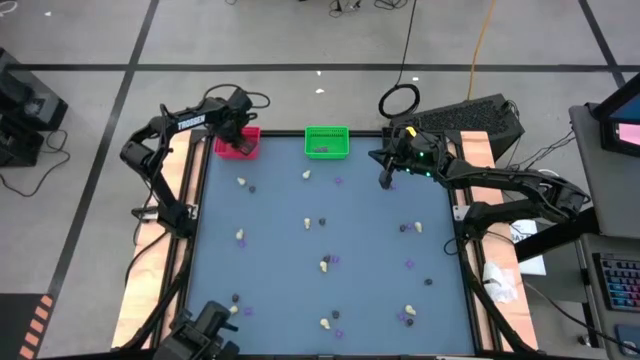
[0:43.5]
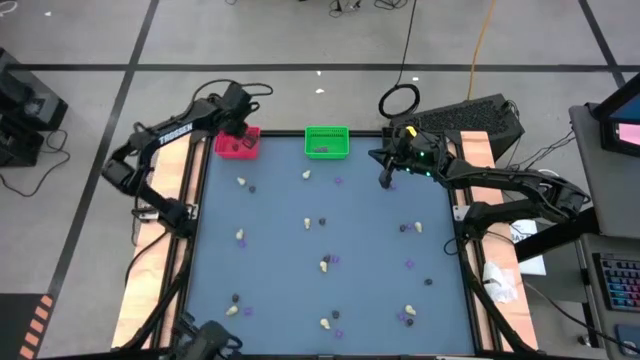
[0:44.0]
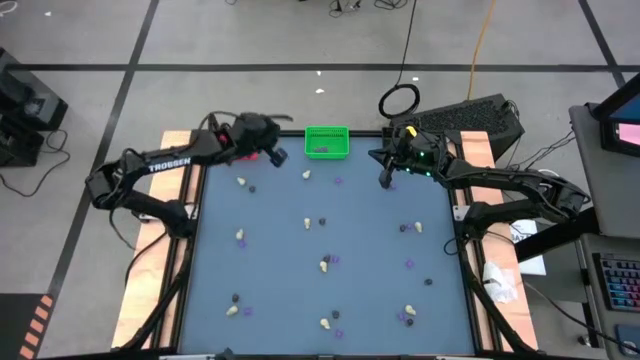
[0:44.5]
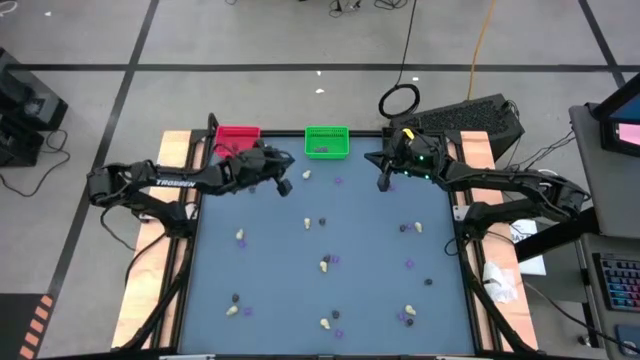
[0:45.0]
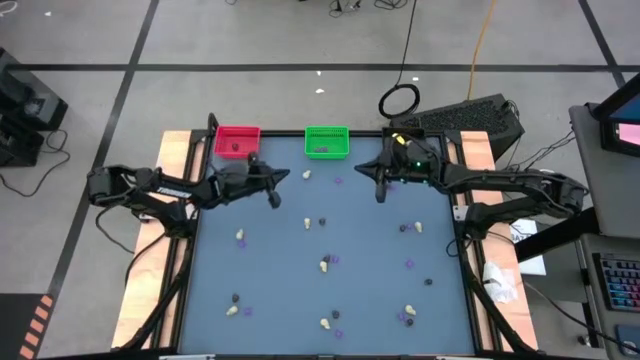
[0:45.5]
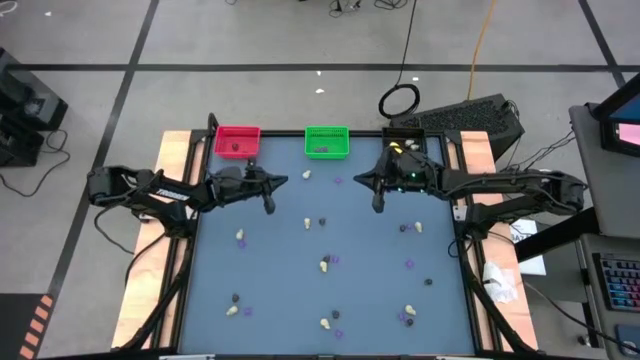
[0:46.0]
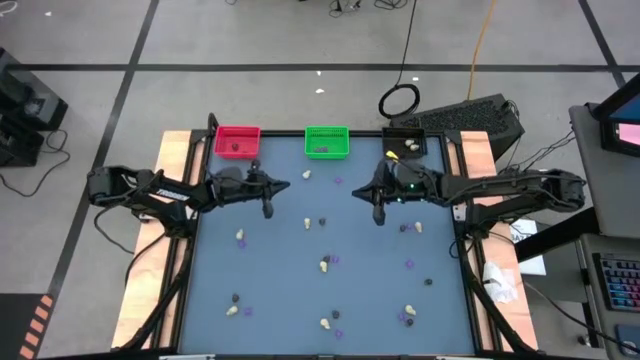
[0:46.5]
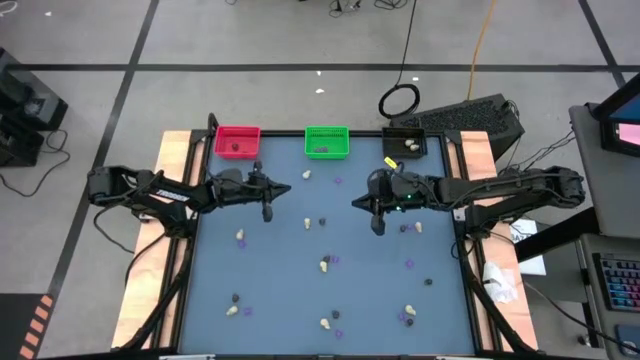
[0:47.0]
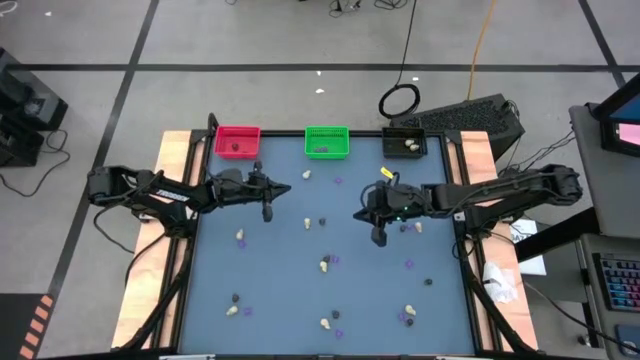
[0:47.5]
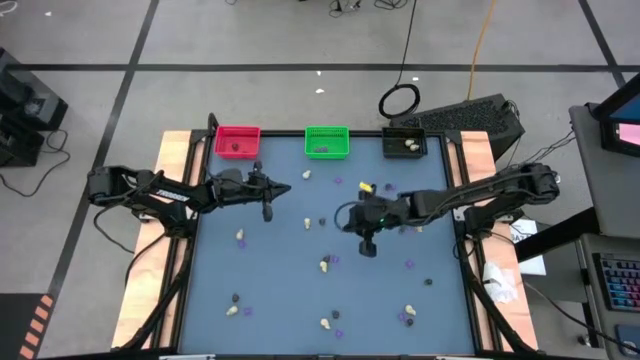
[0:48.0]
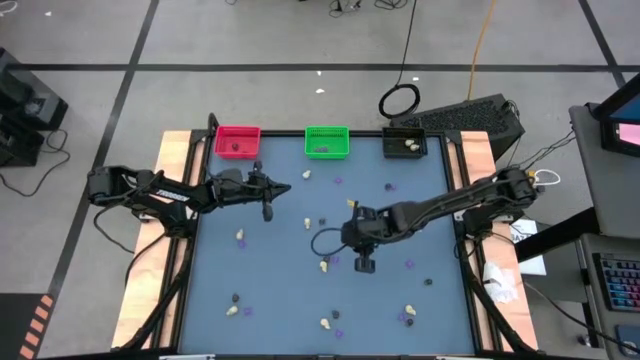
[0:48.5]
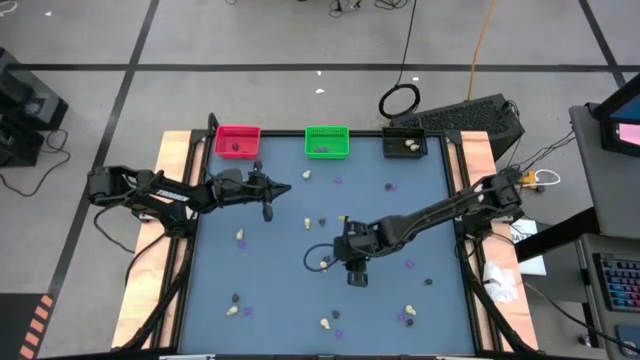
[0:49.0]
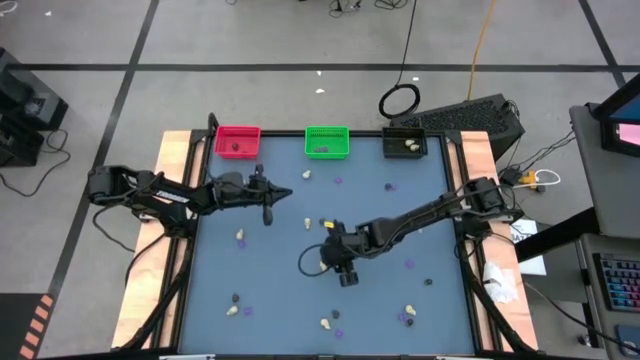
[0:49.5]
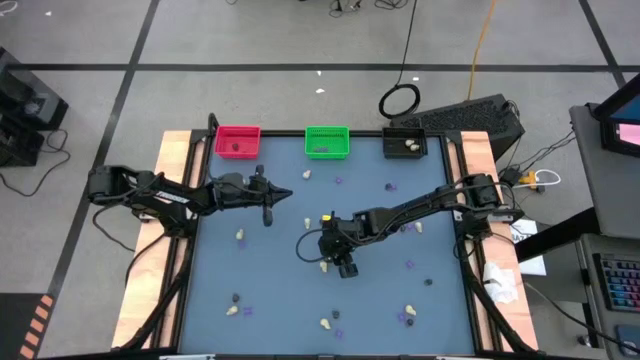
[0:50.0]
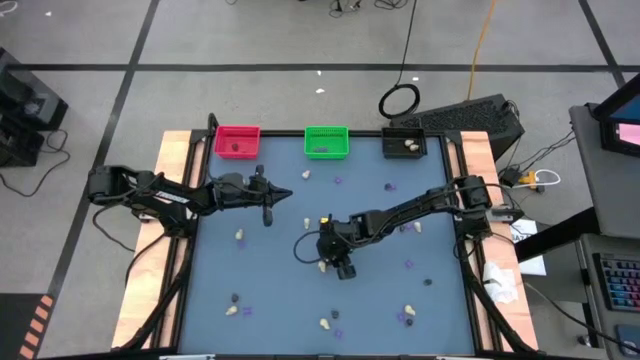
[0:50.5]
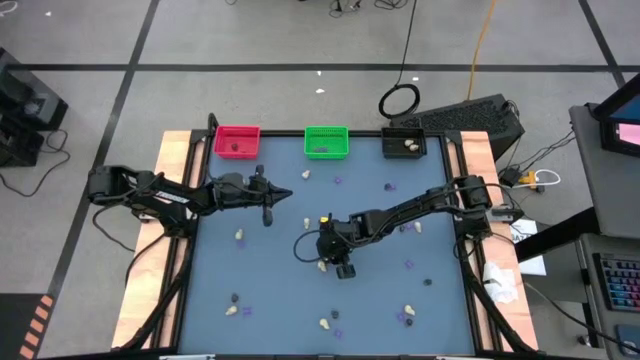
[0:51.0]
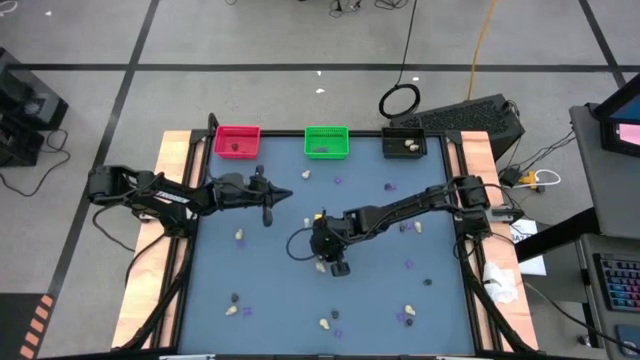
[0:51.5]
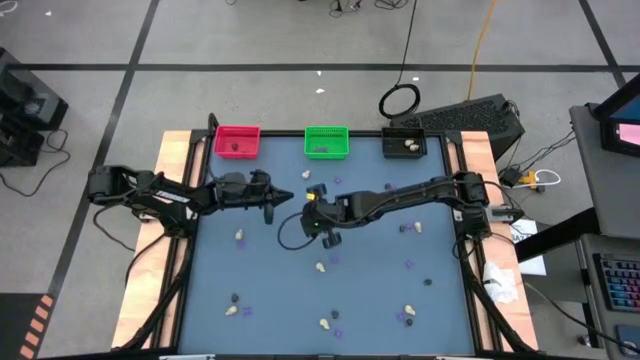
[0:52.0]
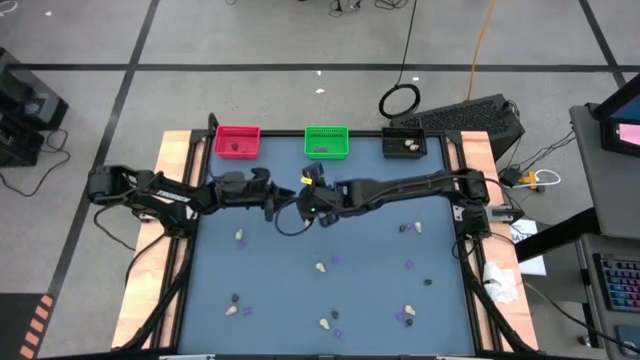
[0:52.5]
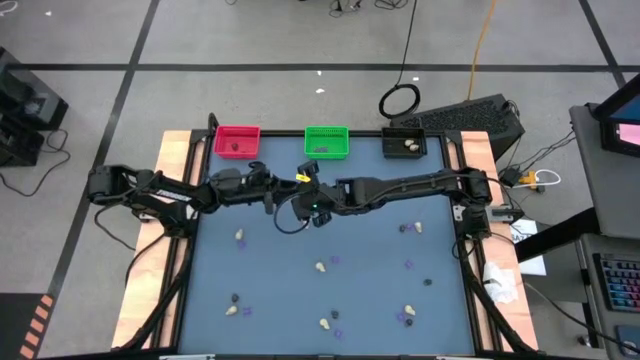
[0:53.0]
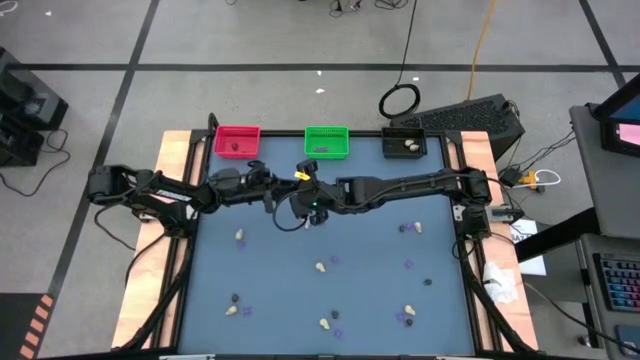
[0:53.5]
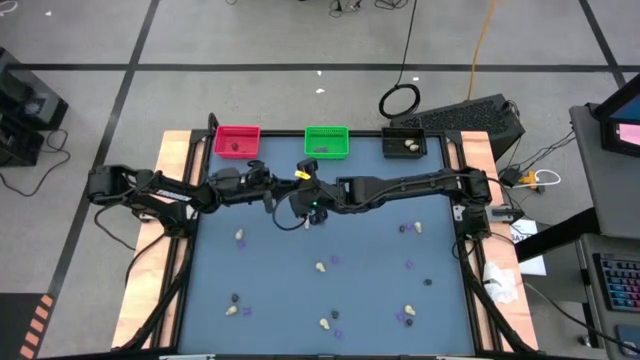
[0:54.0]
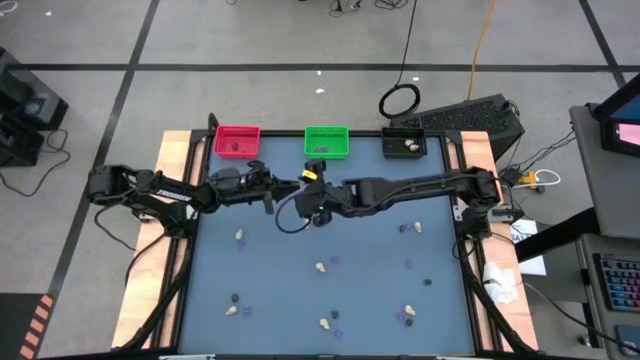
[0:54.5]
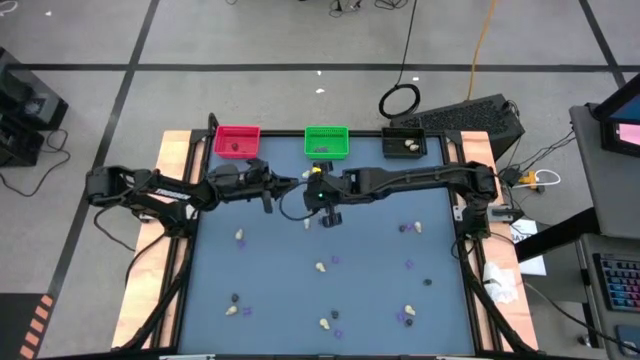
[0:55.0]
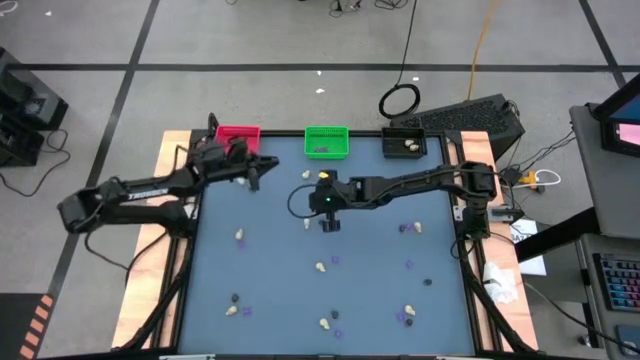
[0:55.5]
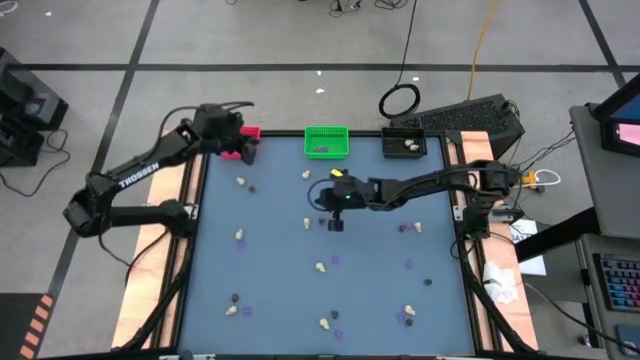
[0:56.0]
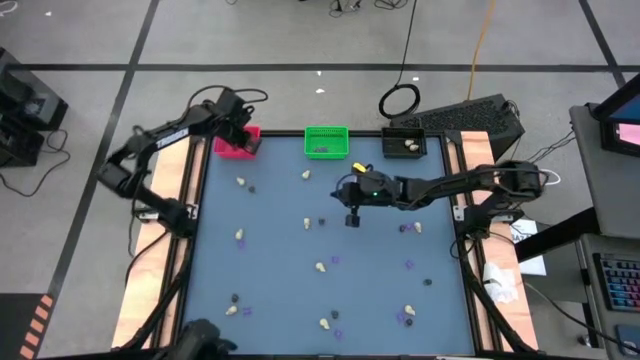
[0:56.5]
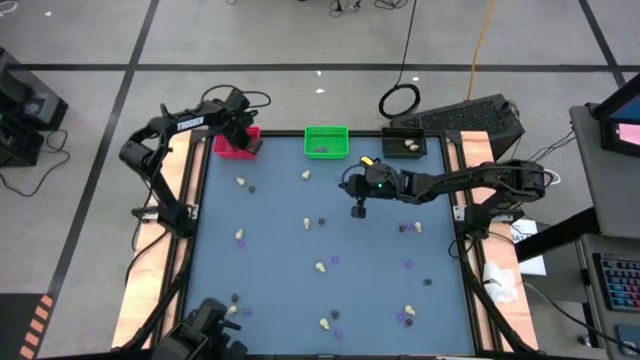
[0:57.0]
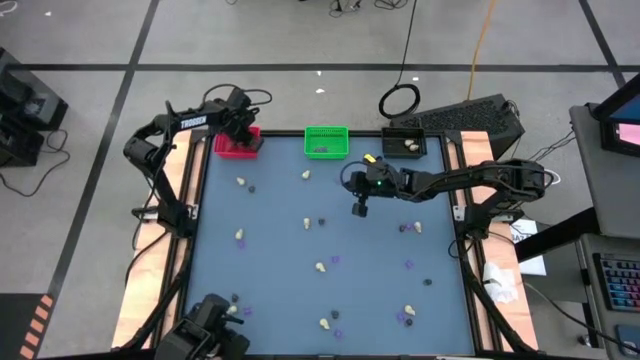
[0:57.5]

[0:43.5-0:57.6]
Task: Sort Halloween decoration
Put the black skull toy into the red bin

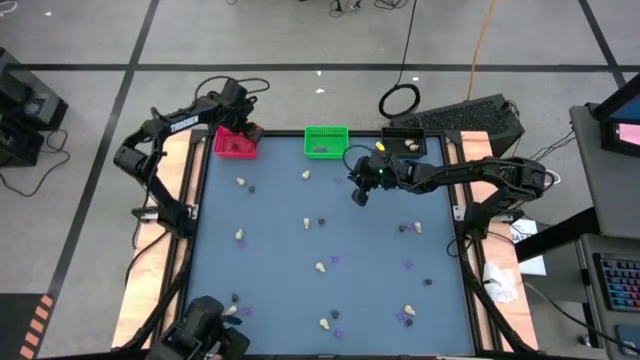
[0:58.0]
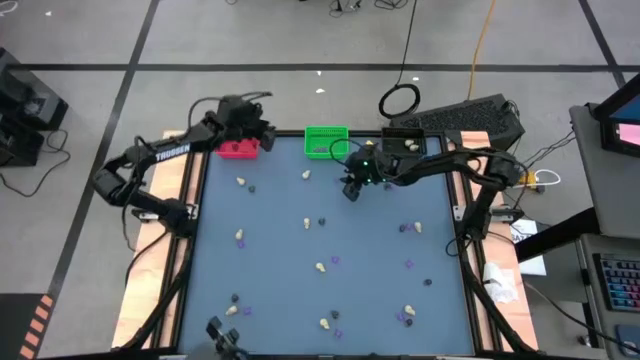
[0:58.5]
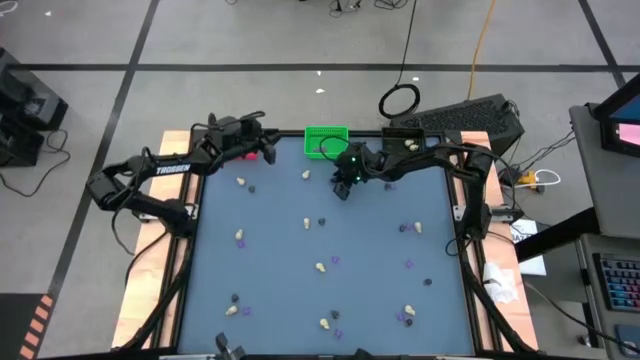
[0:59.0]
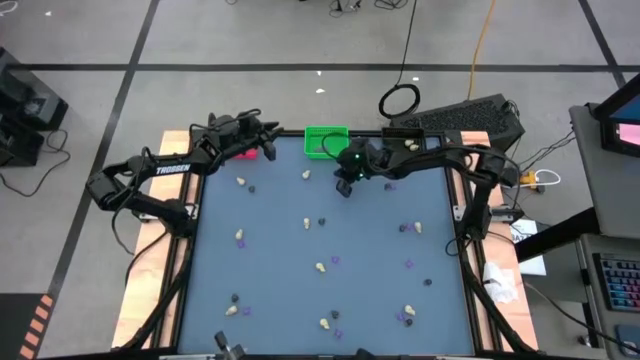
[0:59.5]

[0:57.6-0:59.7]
Put the purple spider toy into the green bin

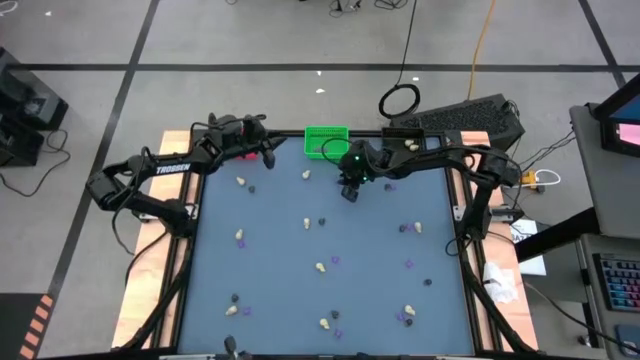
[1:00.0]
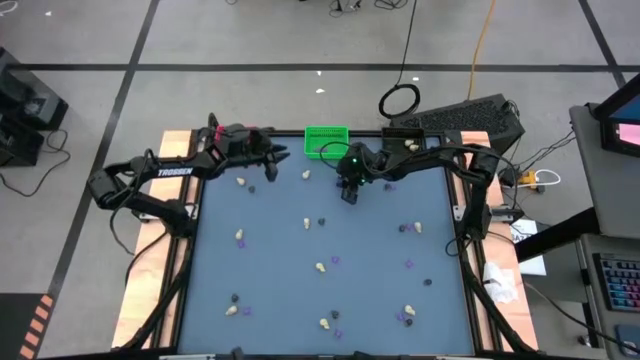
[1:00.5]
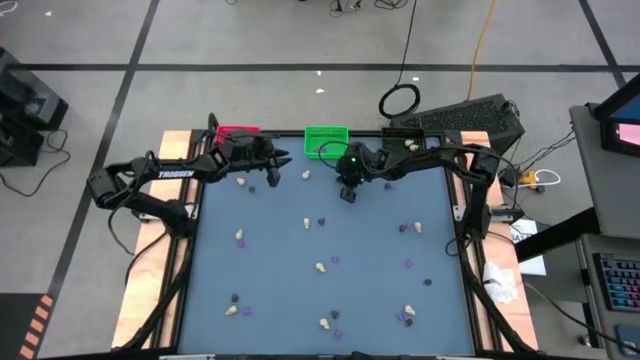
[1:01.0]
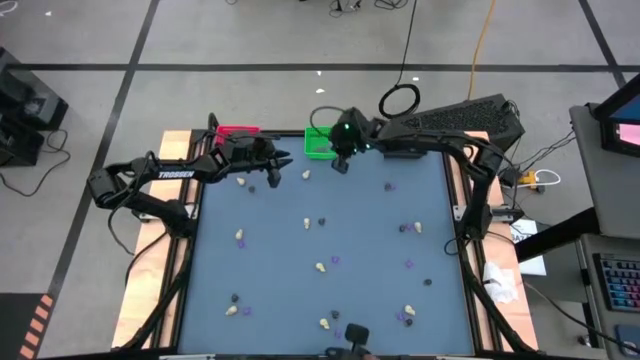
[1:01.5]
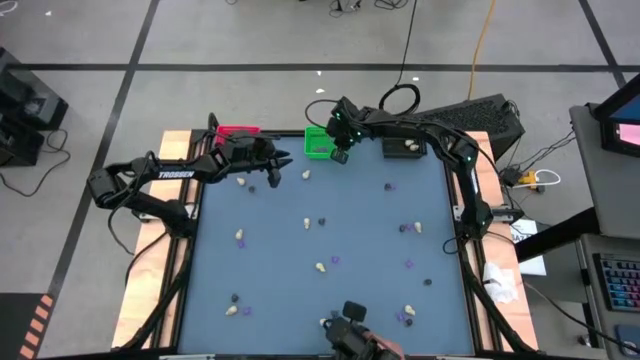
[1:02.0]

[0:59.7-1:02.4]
Put the purple spider toy into the green bin

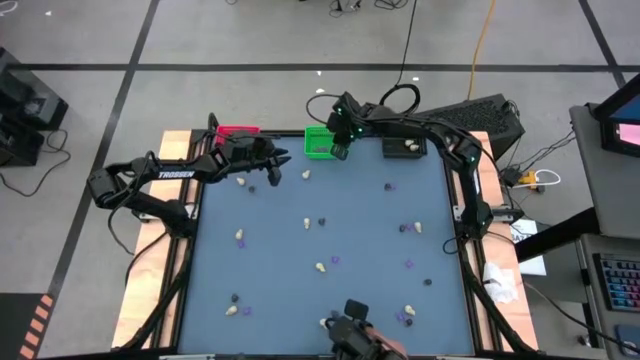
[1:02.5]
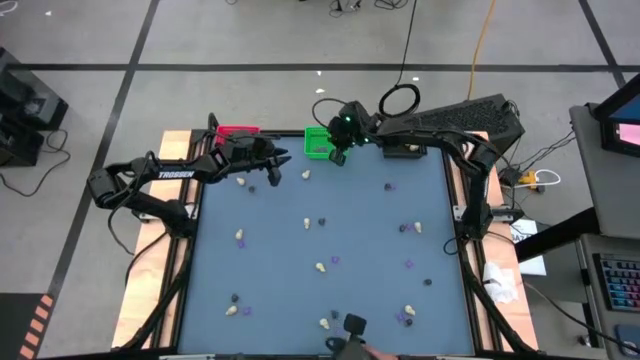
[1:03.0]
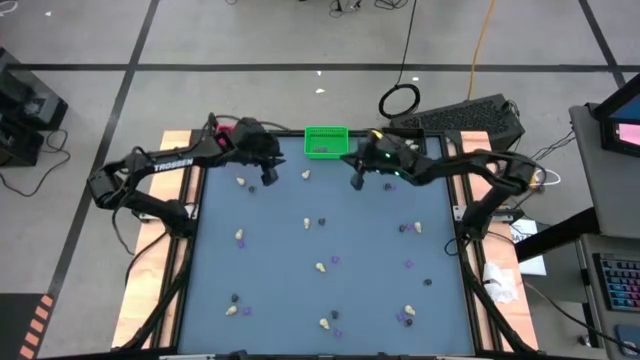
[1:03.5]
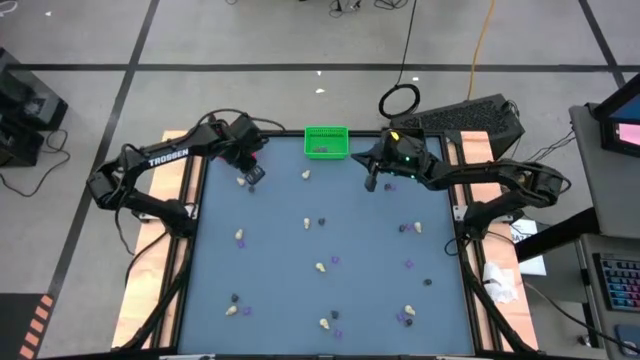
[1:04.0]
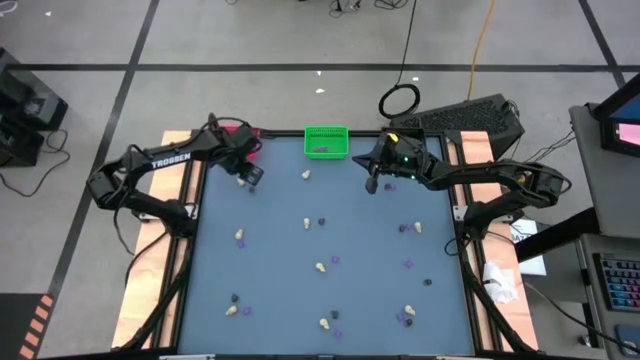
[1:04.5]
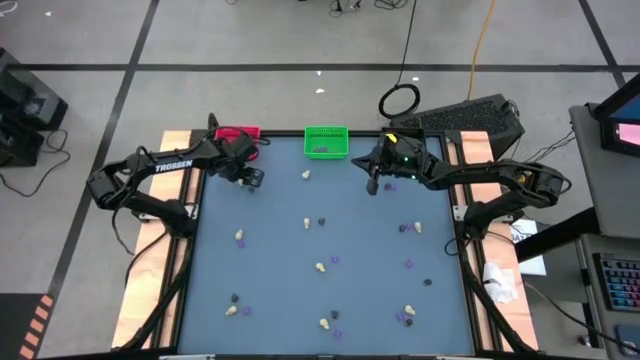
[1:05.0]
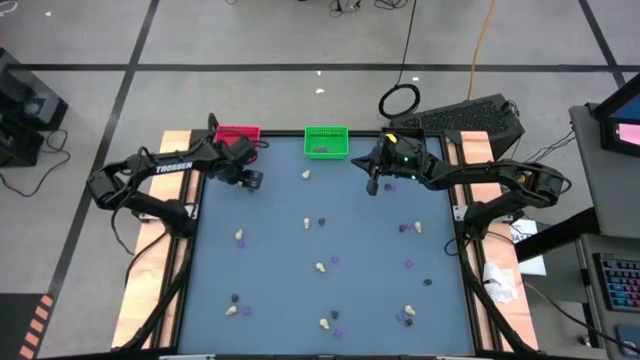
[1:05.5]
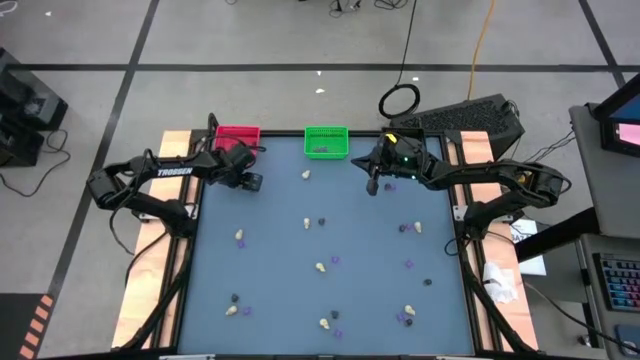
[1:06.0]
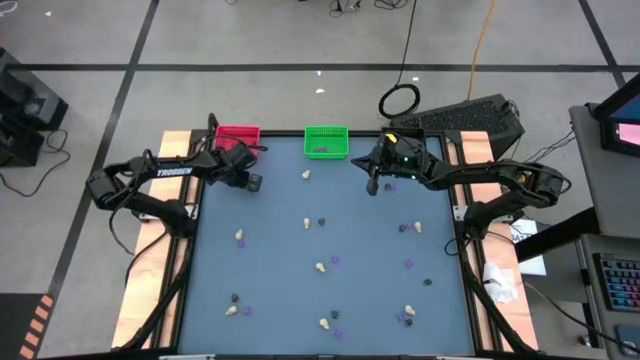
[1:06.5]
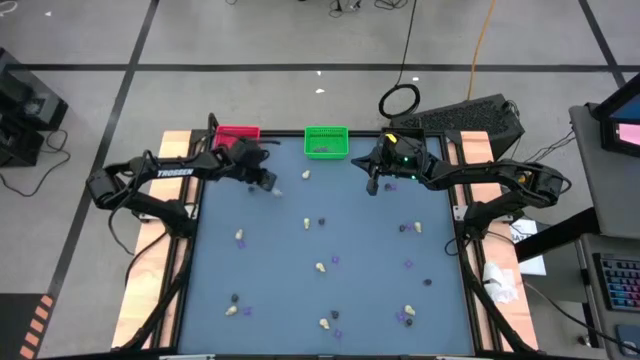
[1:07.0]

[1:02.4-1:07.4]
Put the white skull toy into the black bin
